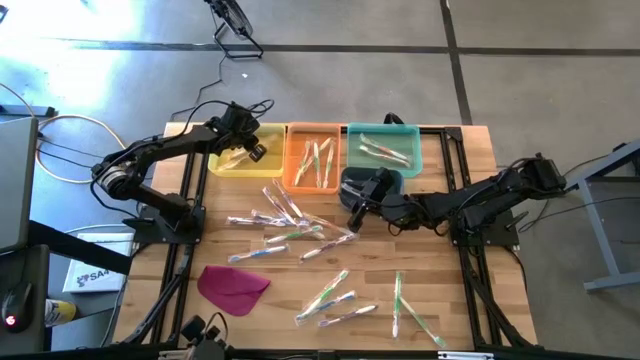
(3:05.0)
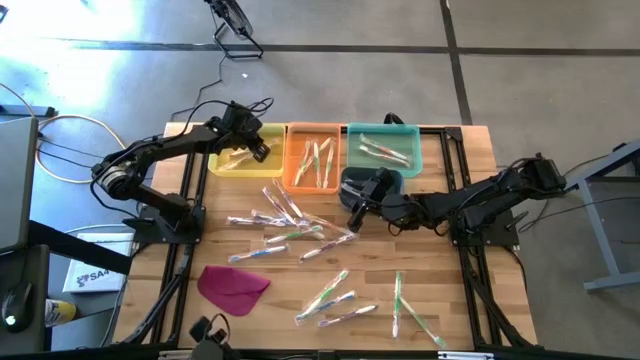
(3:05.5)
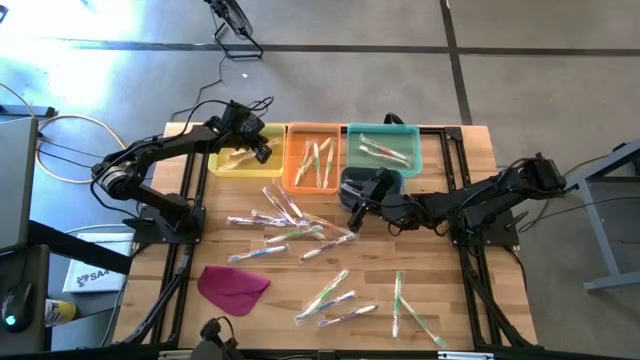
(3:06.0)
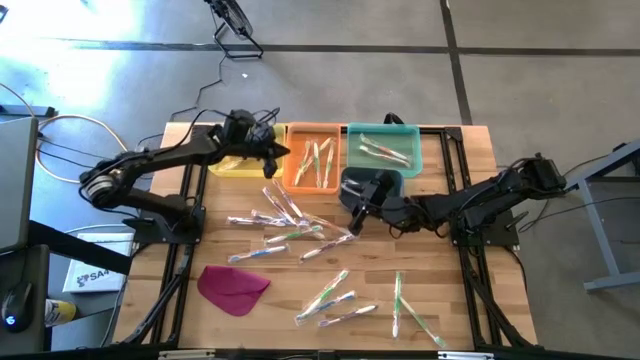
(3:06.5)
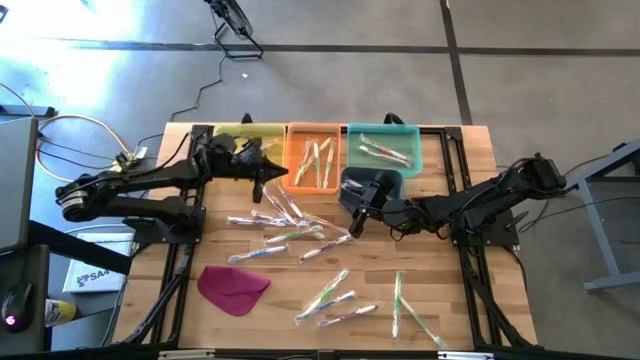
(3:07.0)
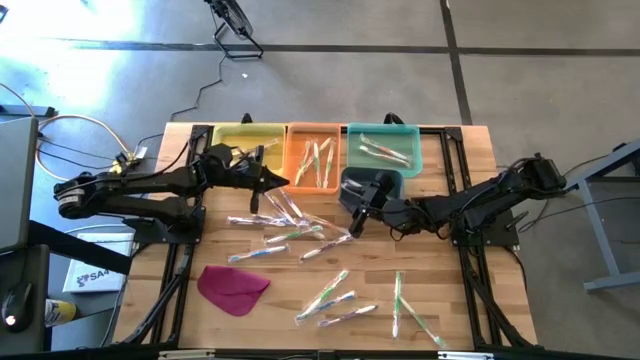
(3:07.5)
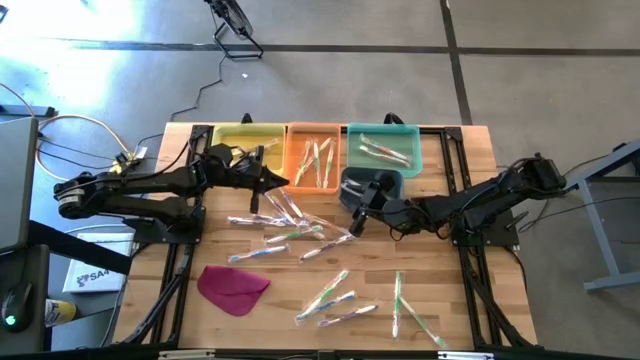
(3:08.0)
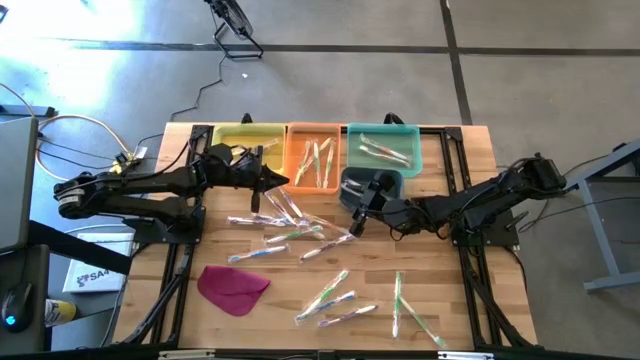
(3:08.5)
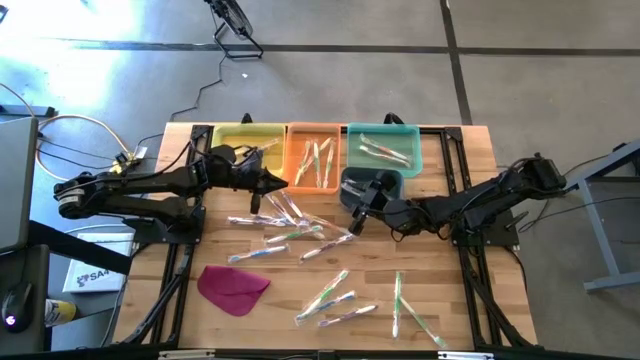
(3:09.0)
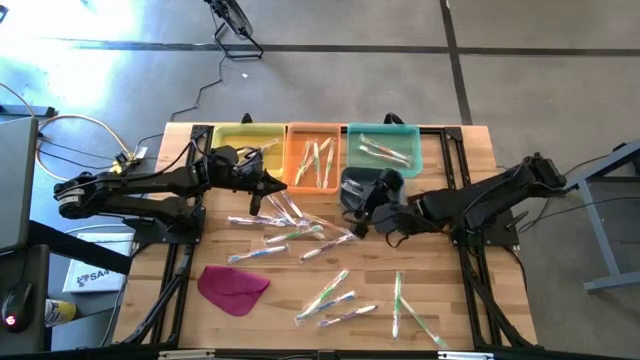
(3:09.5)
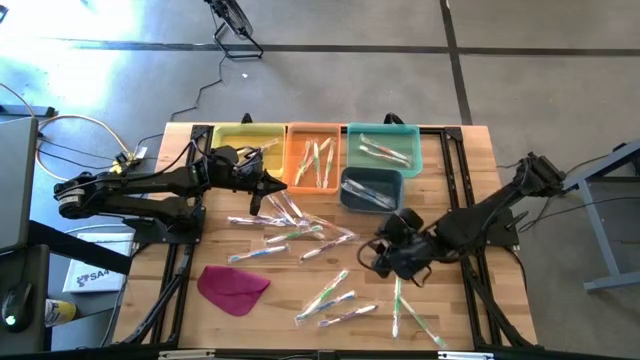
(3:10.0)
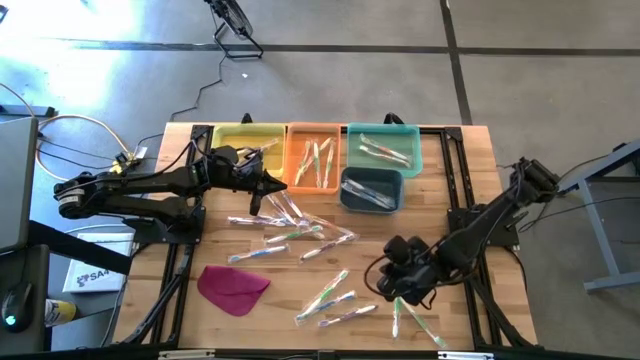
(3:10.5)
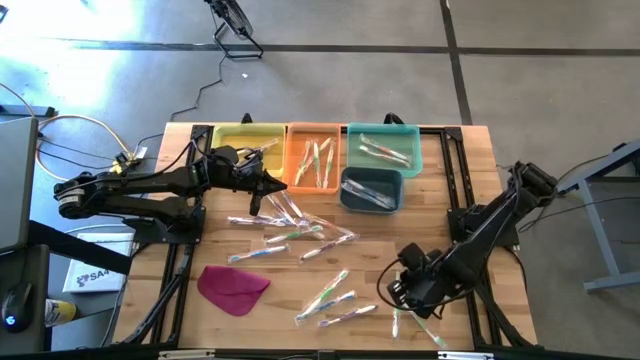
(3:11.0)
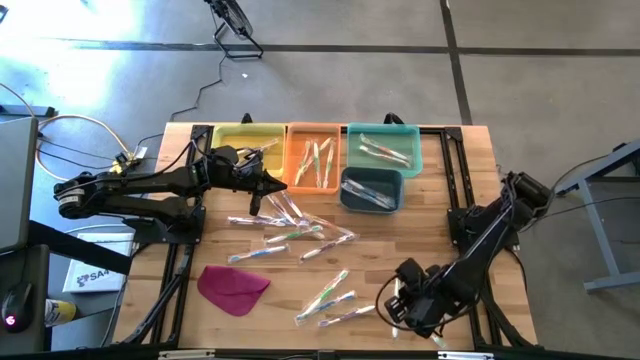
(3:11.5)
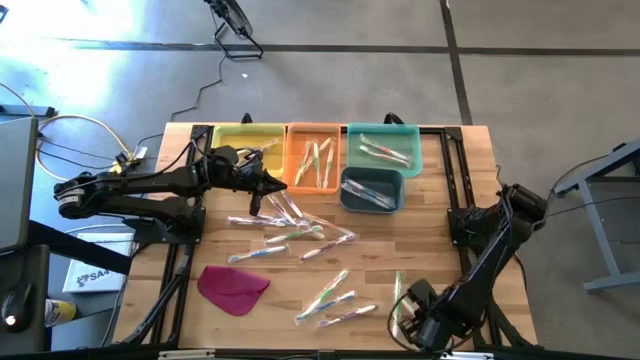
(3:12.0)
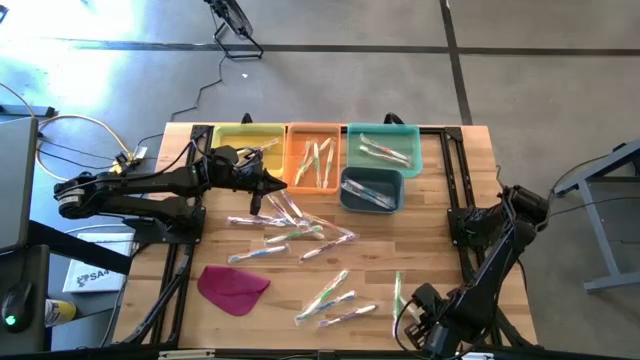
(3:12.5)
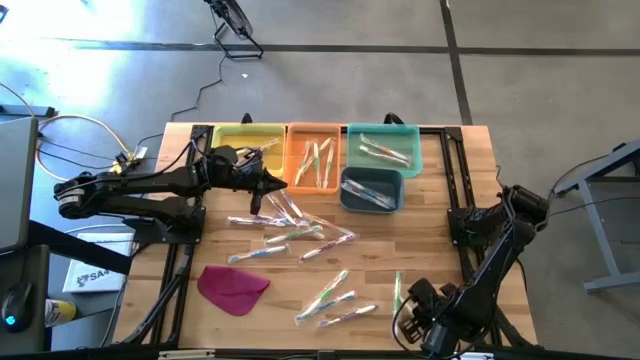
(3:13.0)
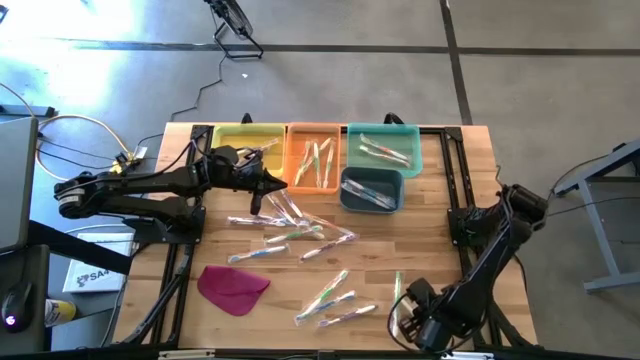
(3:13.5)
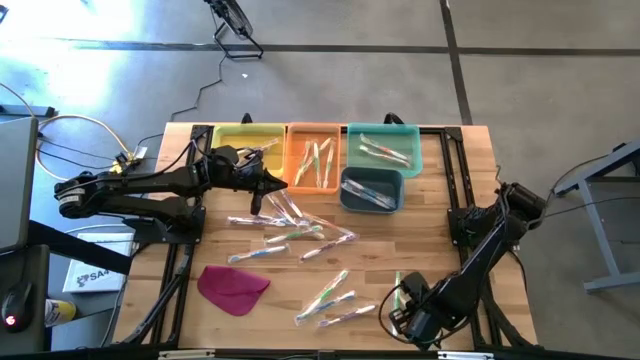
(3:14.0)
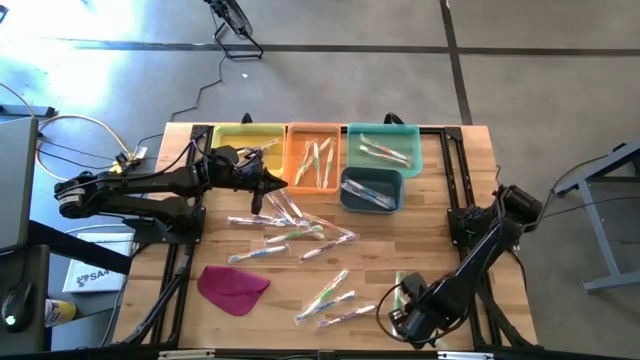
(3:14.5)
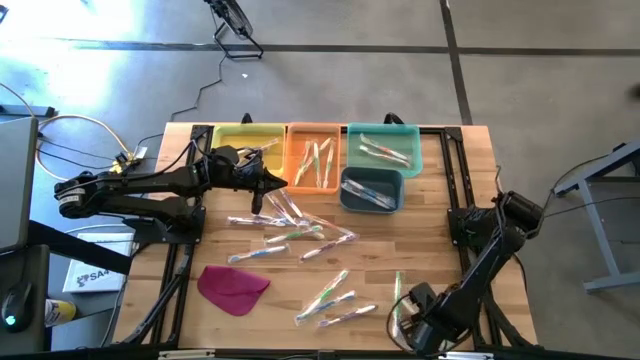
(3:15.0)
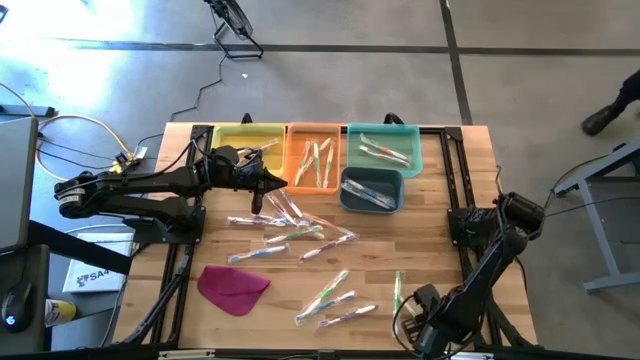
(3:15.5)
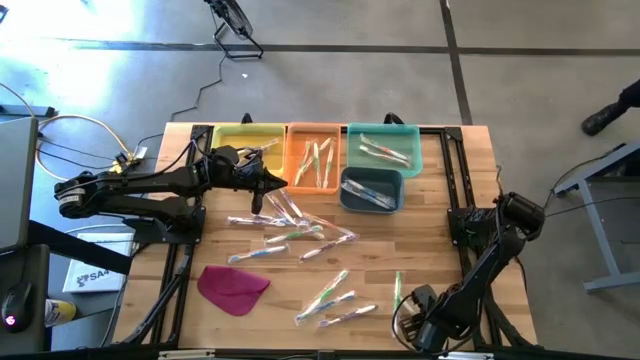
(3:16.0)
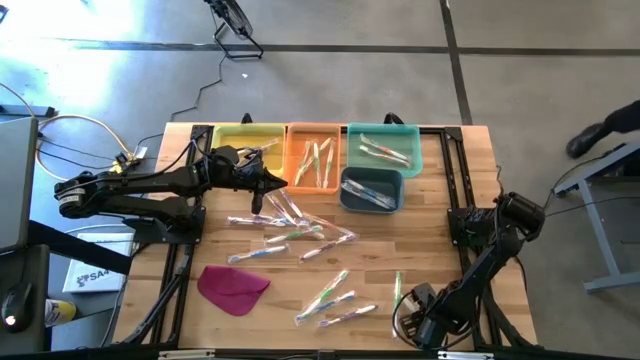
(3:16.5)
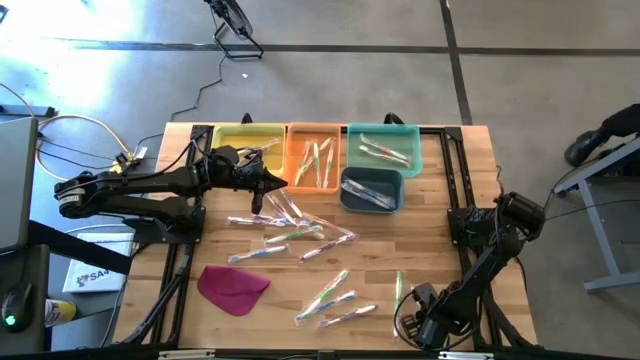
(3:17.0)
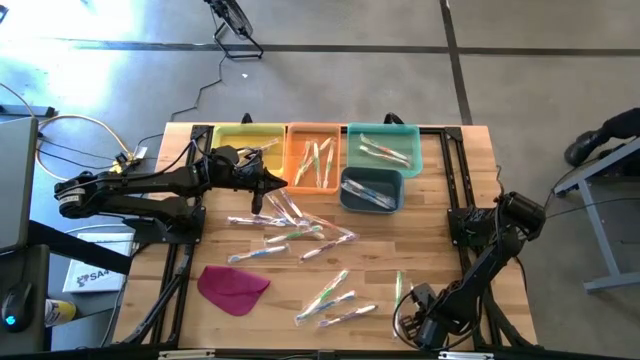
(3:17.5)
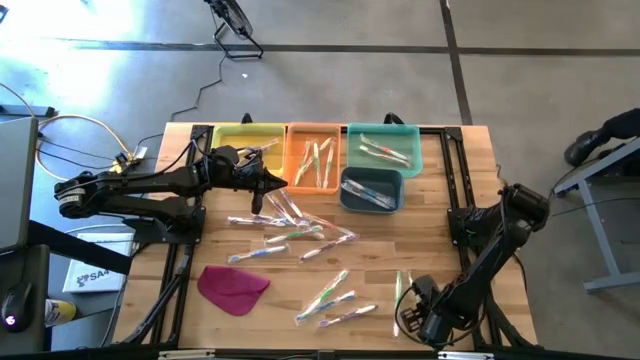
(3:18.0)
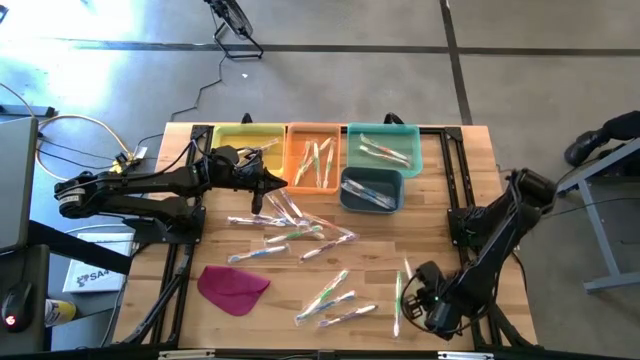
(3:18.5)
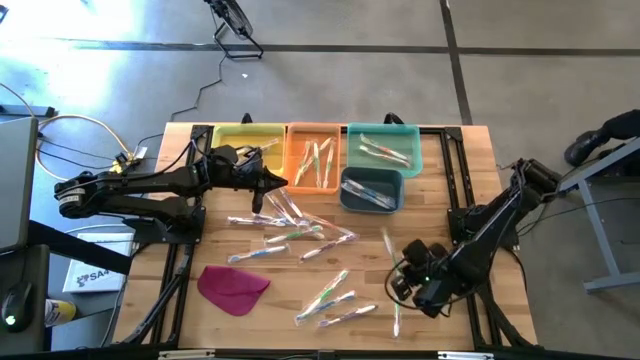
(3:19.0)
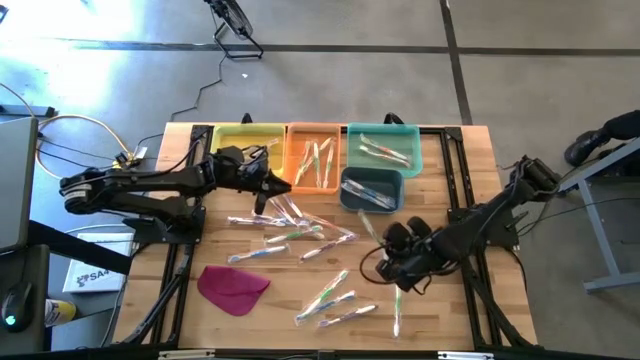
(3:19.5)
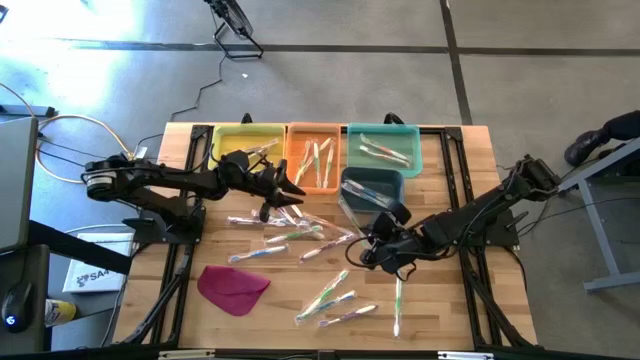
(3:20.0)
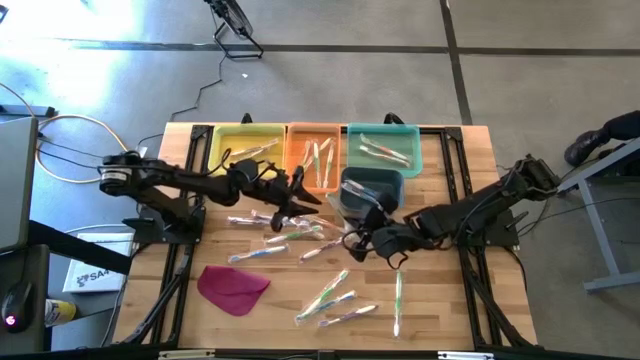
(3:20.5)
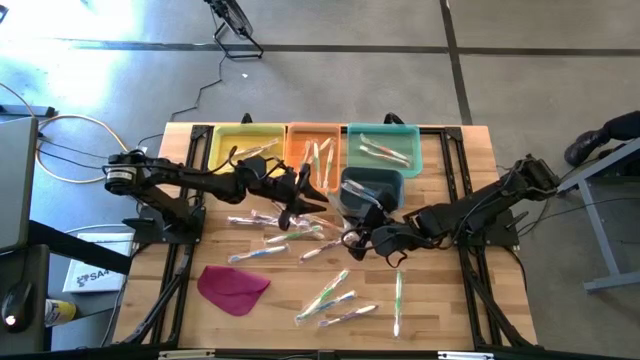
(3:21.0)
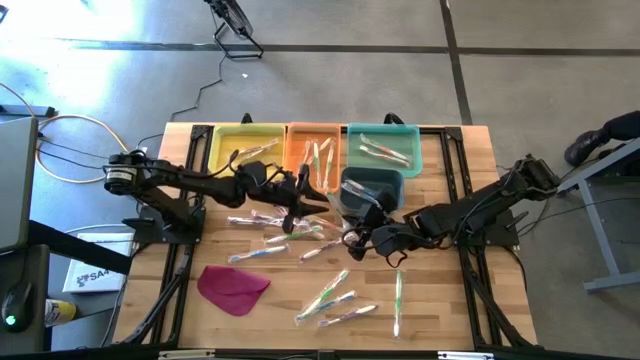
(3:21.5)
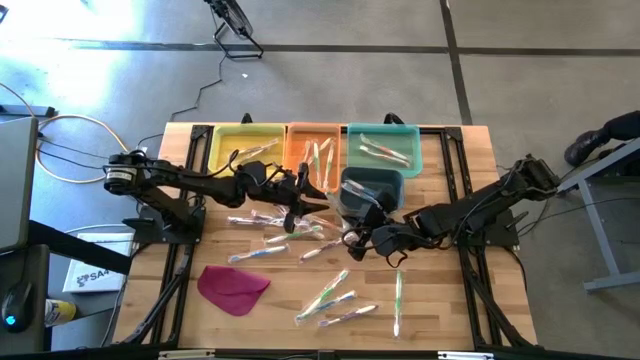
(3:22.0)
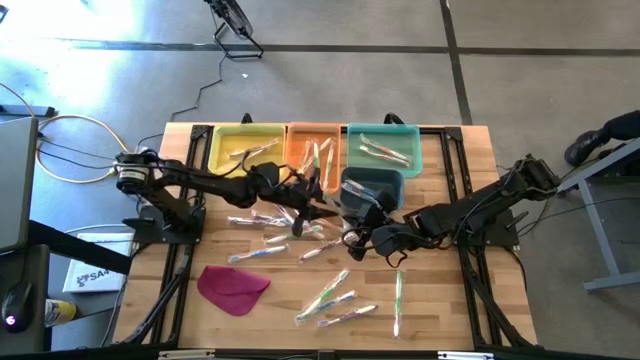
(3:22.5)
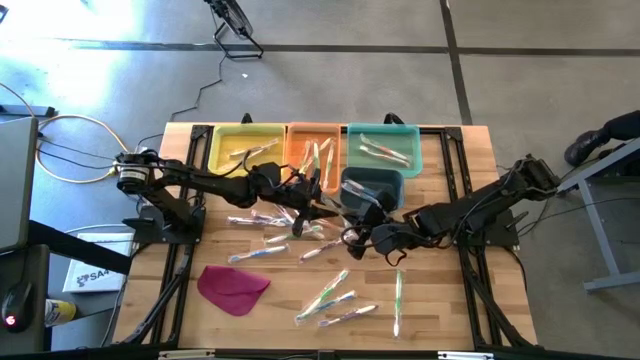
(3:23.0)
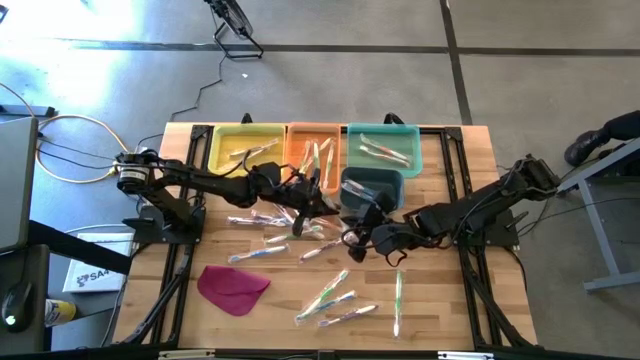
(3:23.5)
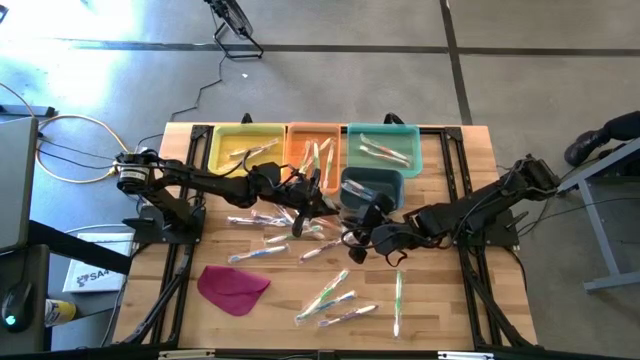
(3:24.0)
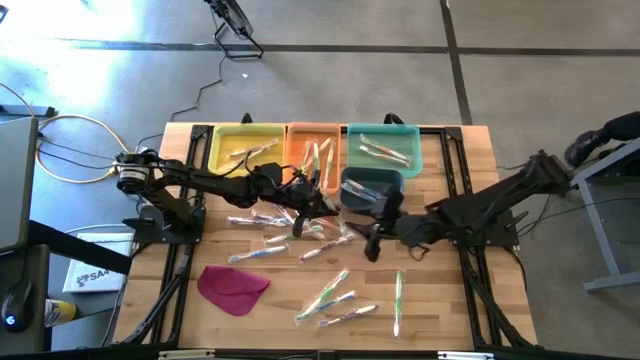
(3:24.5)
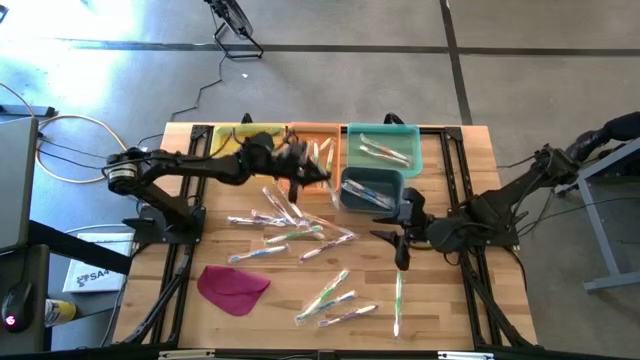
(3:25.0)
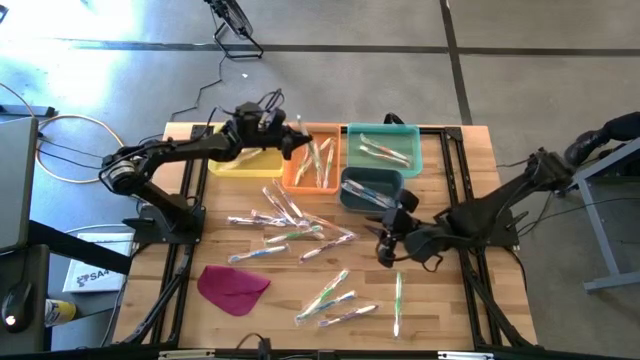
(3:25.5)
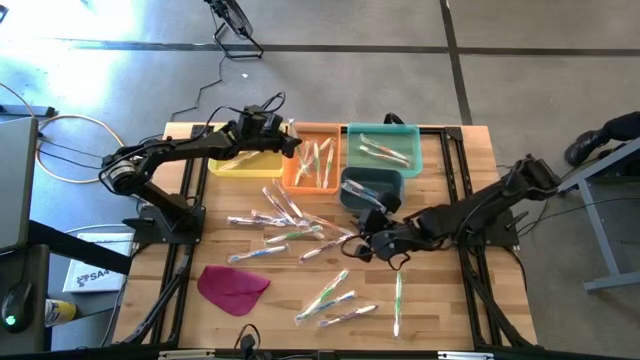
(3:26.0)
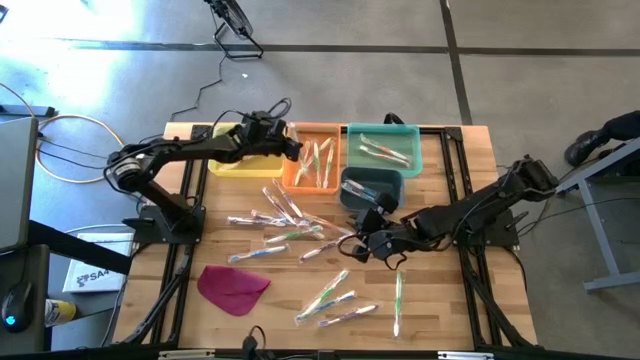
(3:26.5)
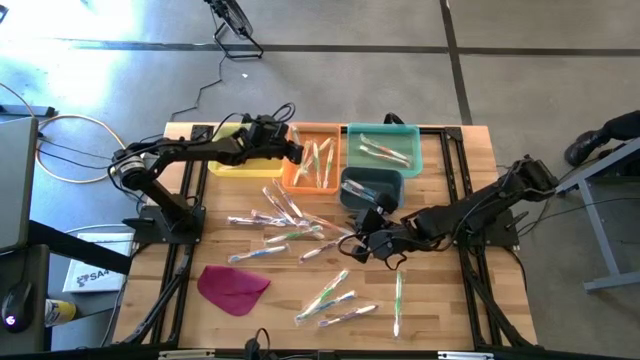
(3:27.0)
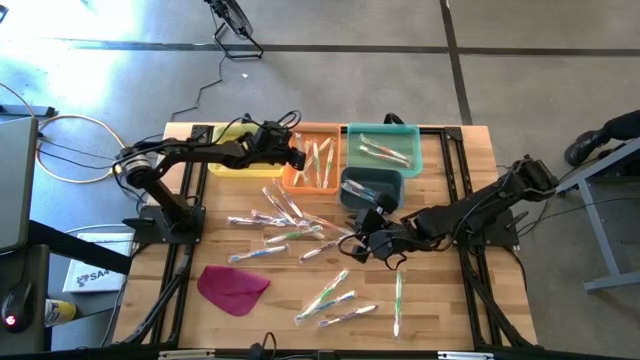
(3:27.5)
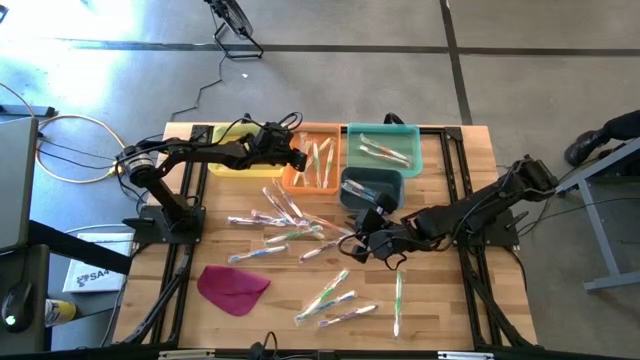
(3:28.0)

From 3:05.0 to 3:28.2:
Task: Pick & Place Toothbrushes
Put the green toothbrush into the orange bin
